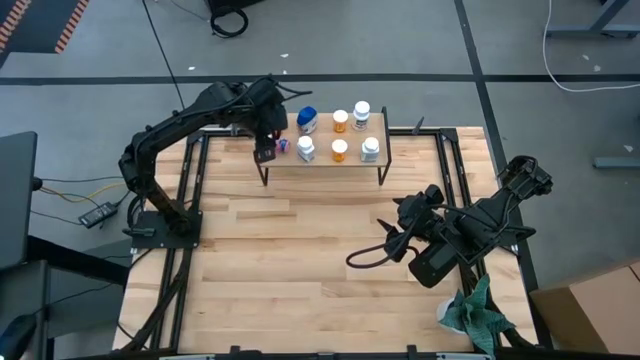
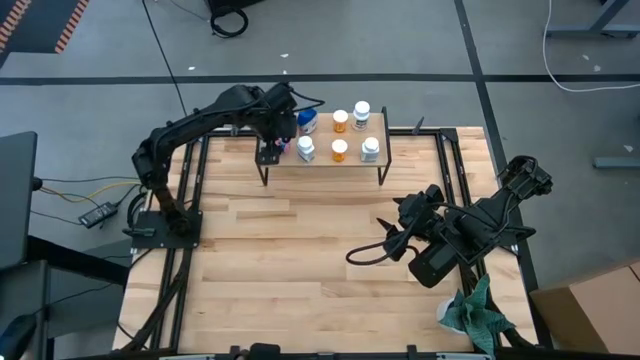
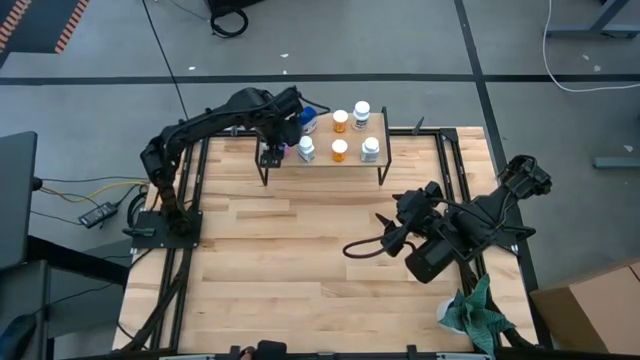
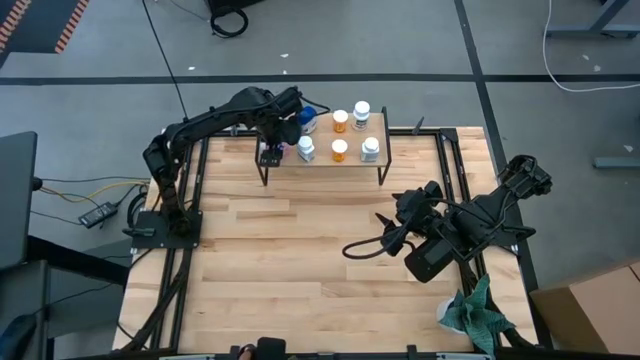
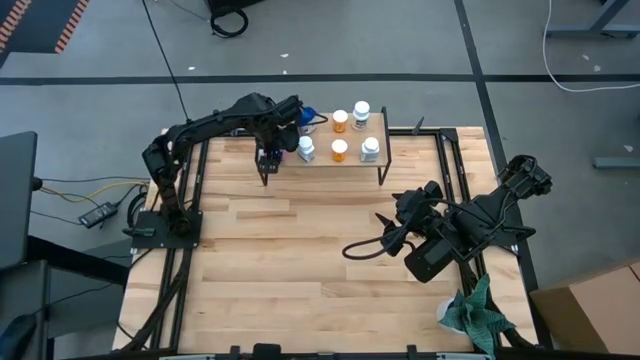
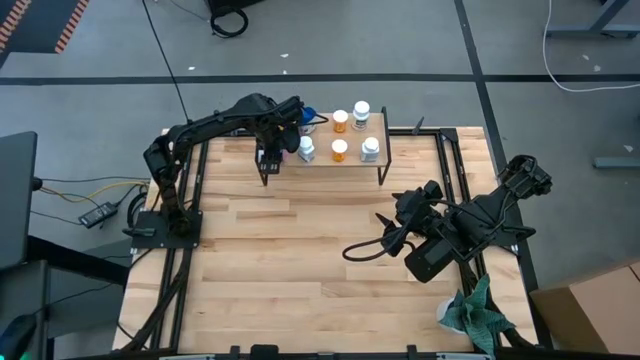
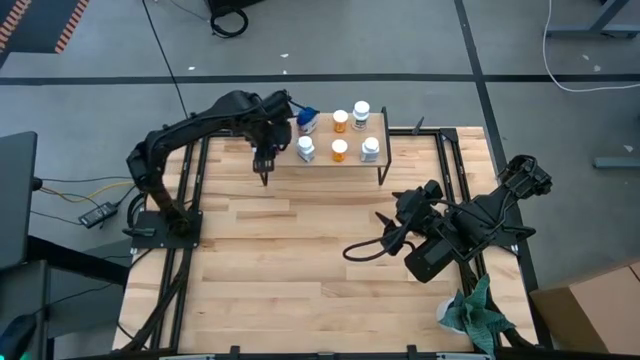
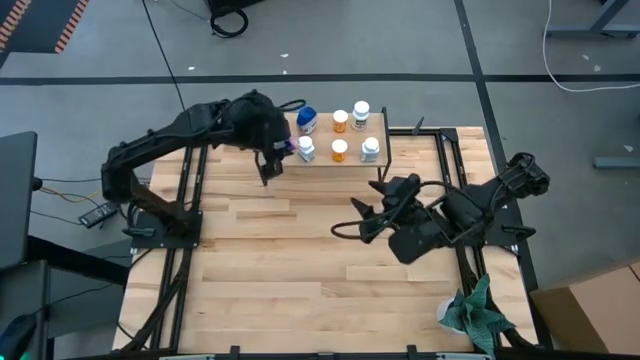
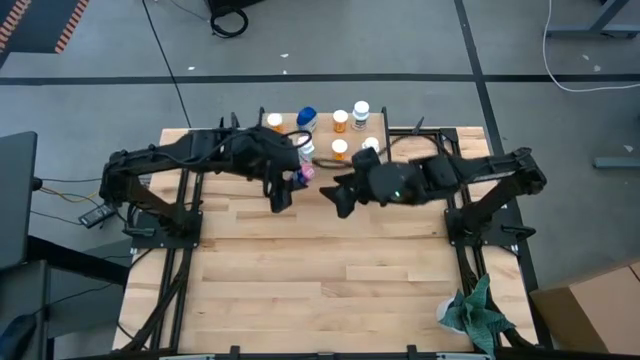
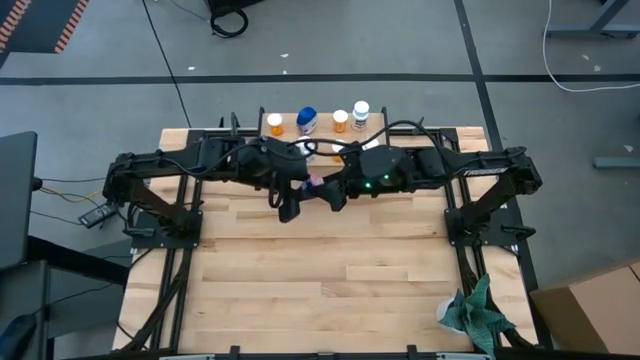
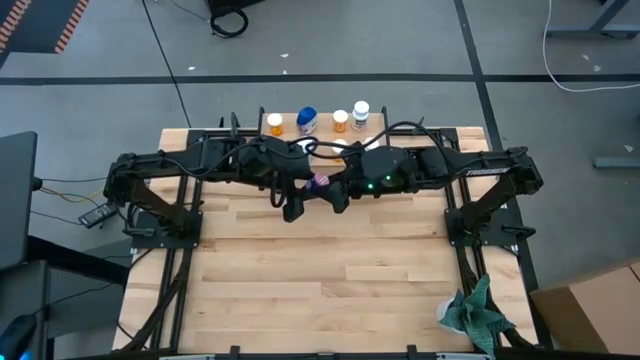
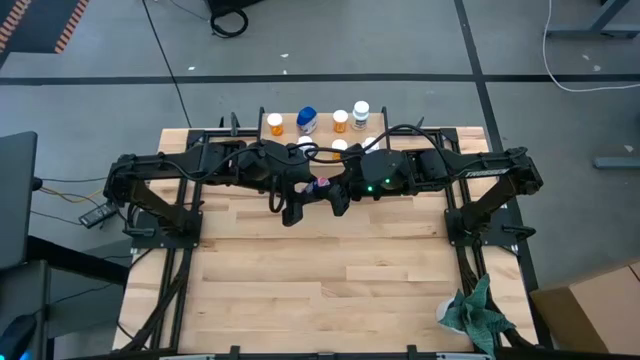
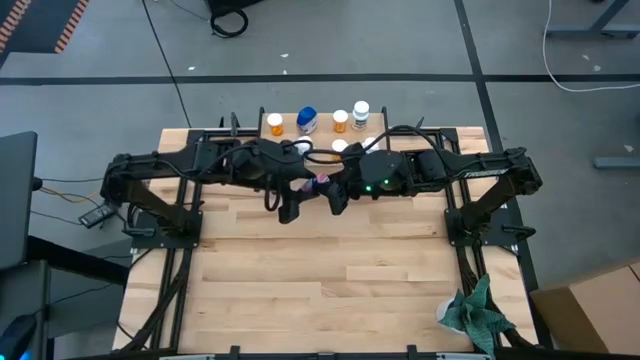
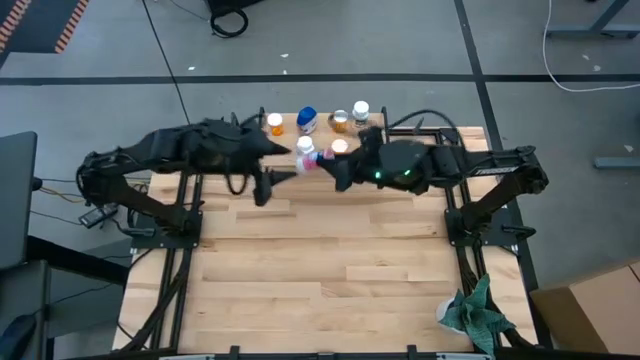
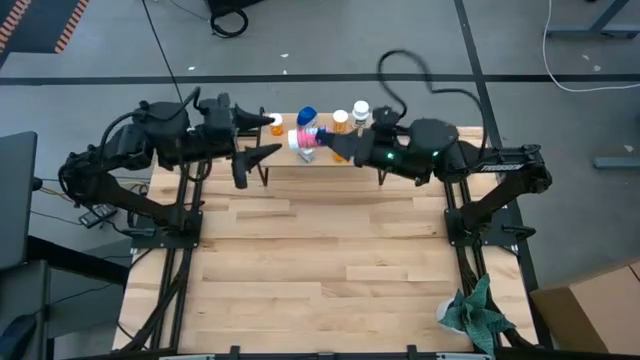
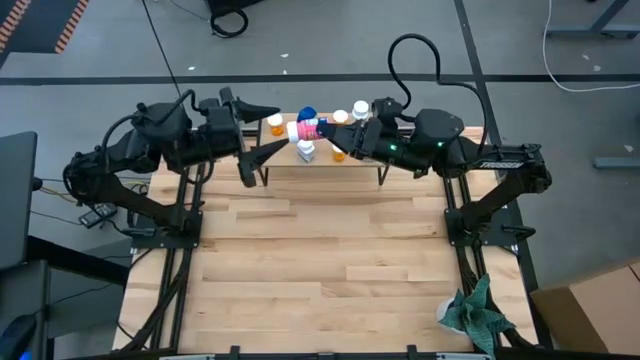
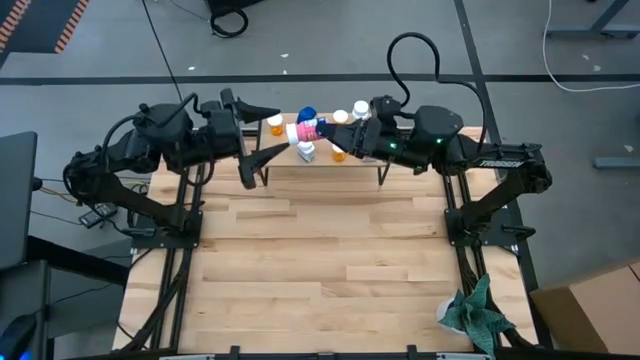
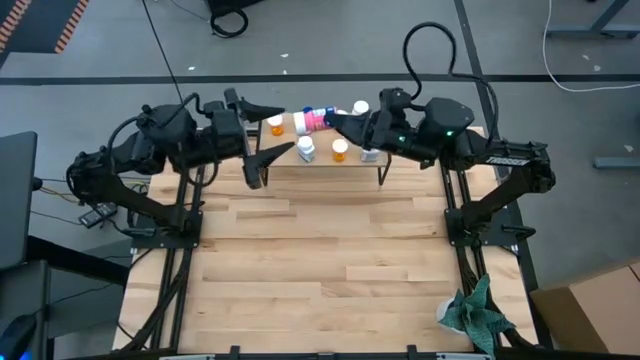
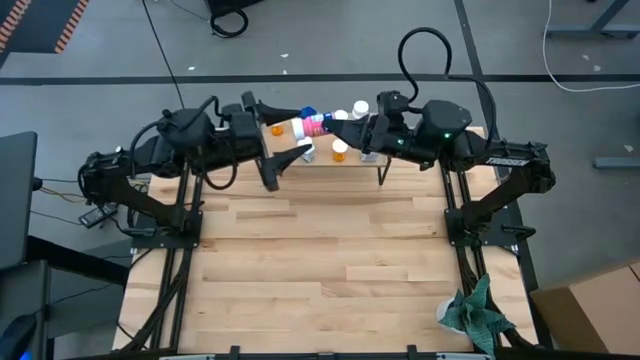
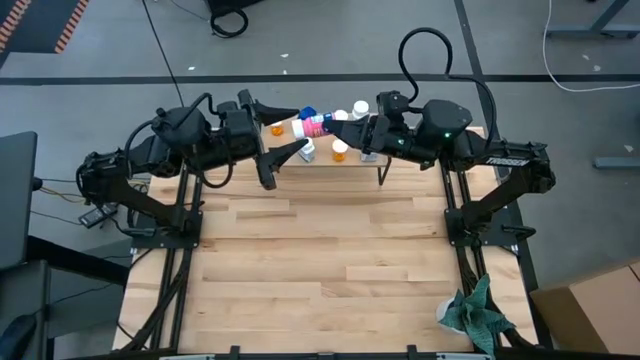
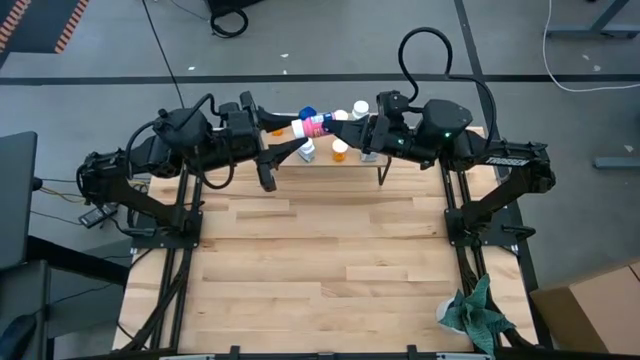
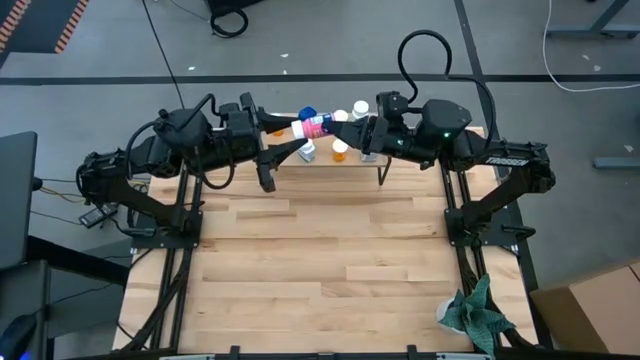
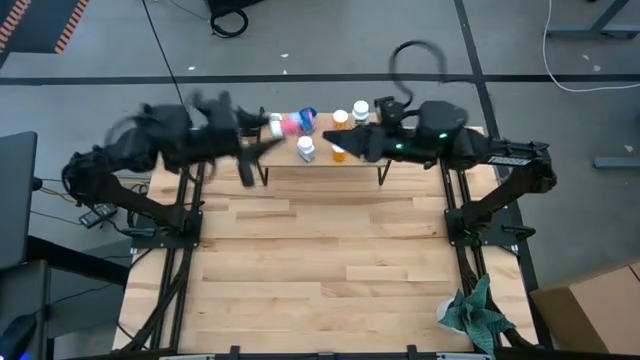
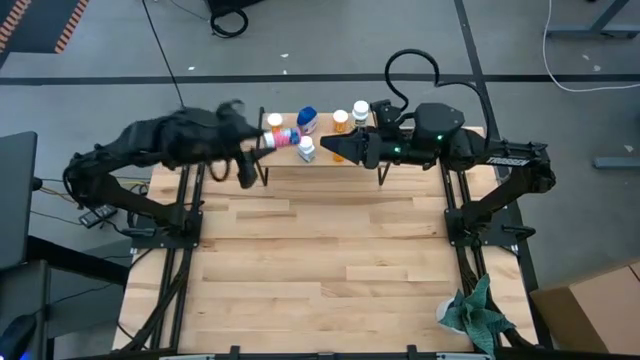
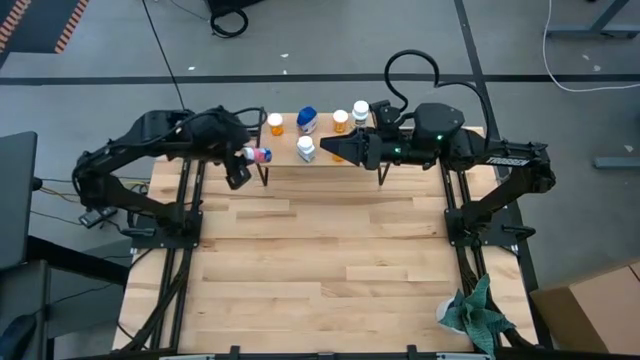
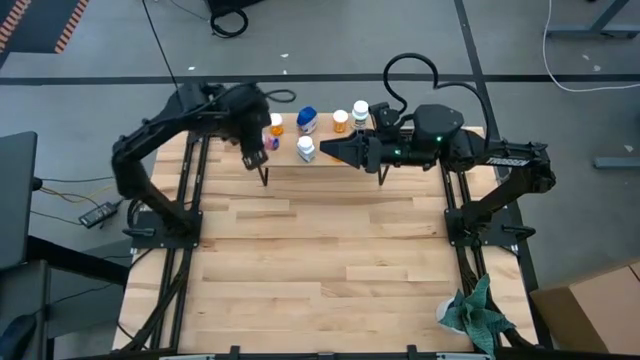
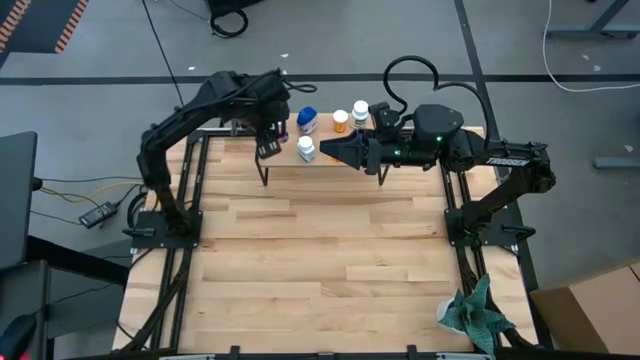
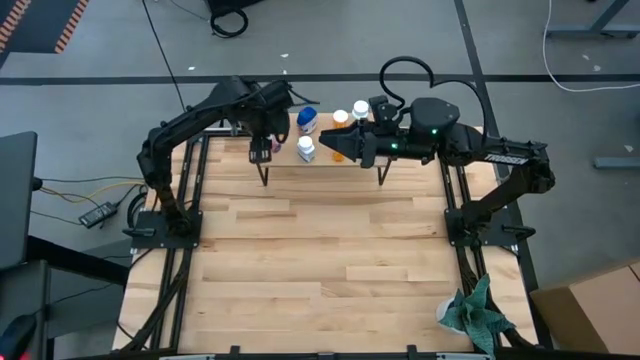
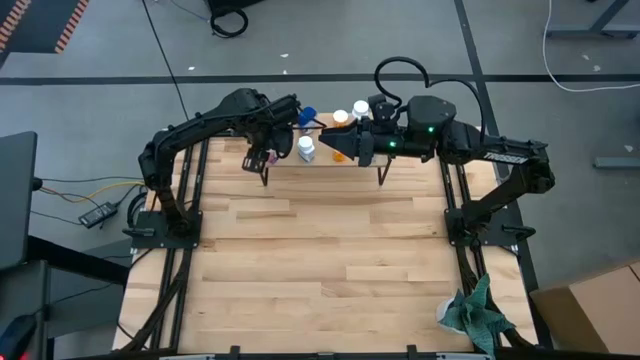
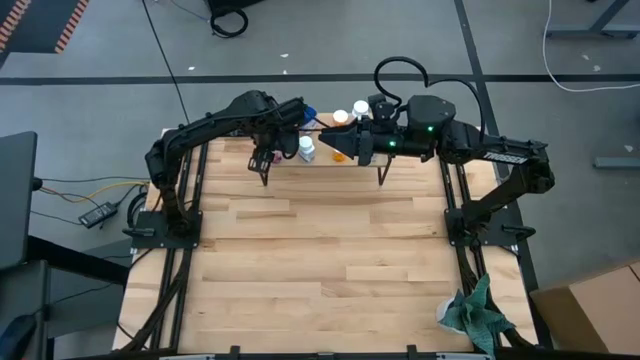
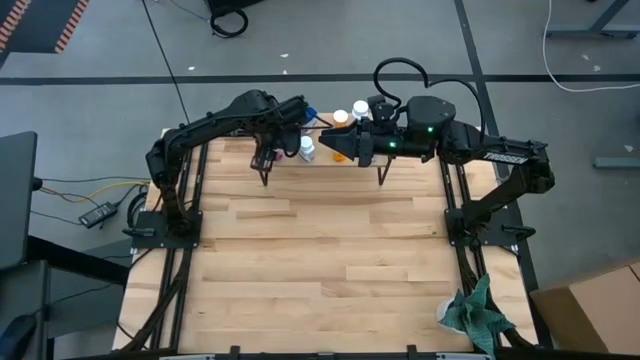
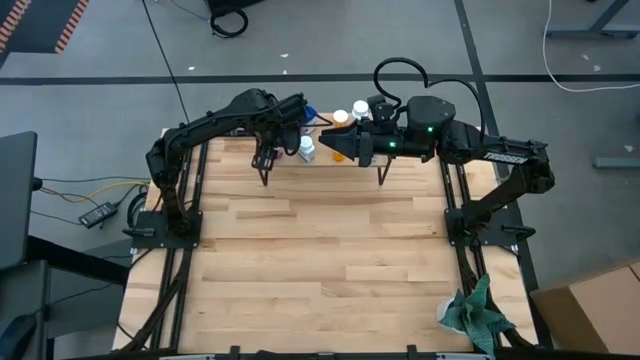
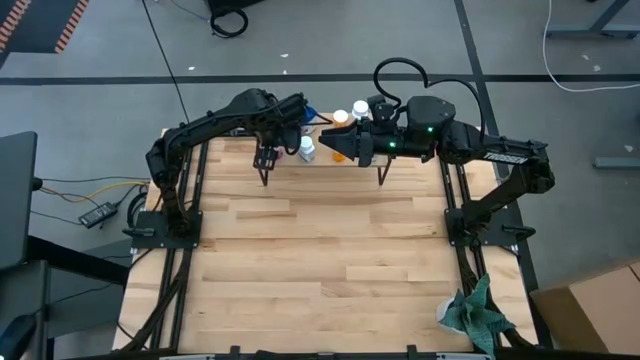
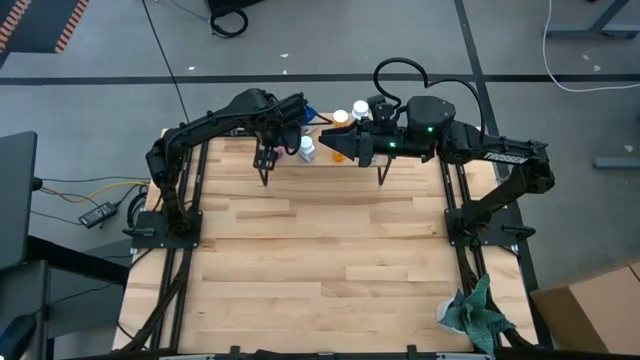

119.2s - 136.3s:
Task: Pick and place medicine bottles onto shelf by color
Put the pink medicine bottle on the shelf

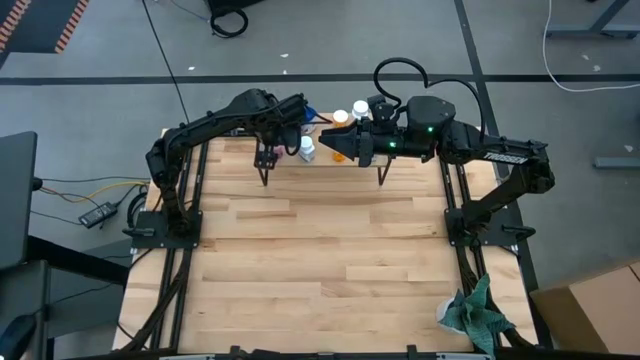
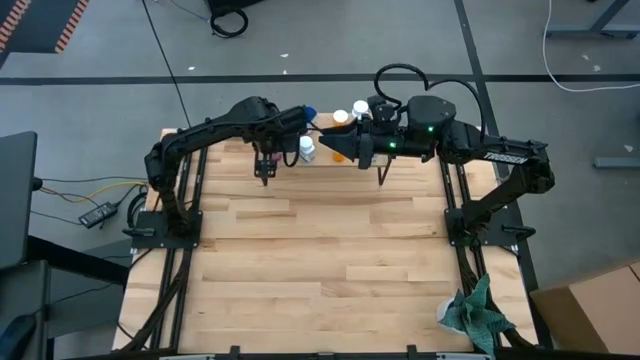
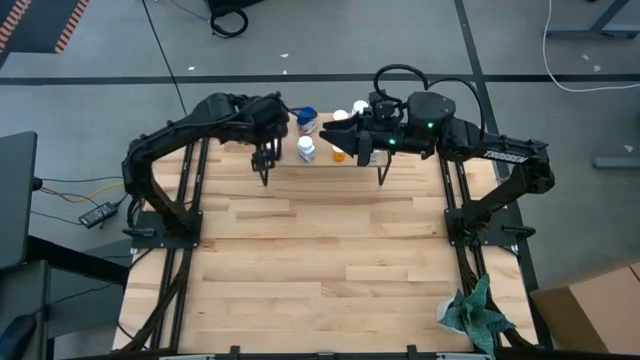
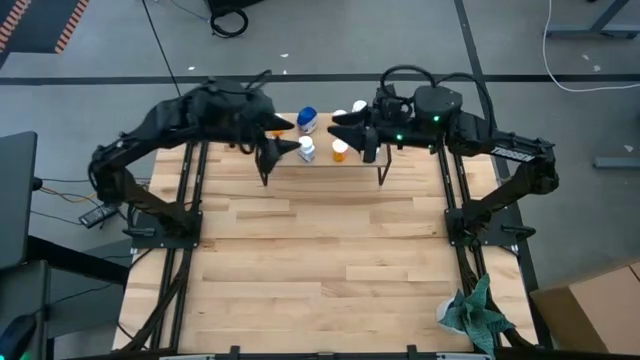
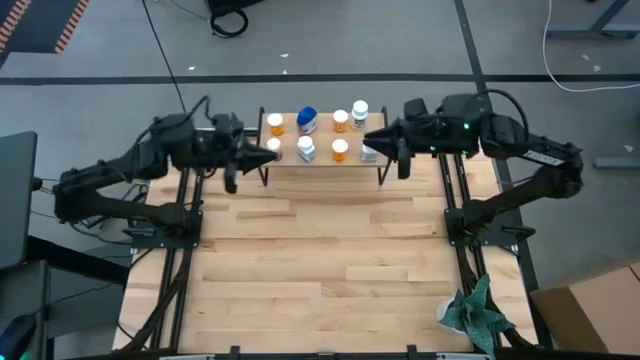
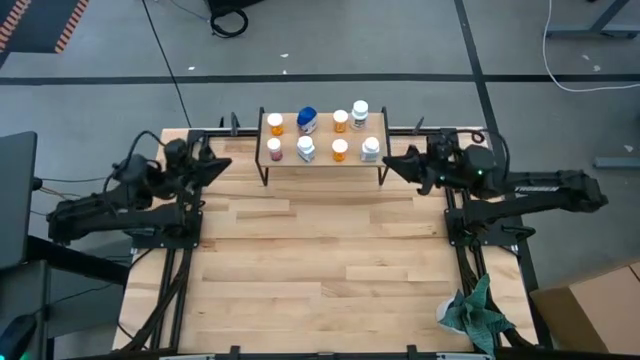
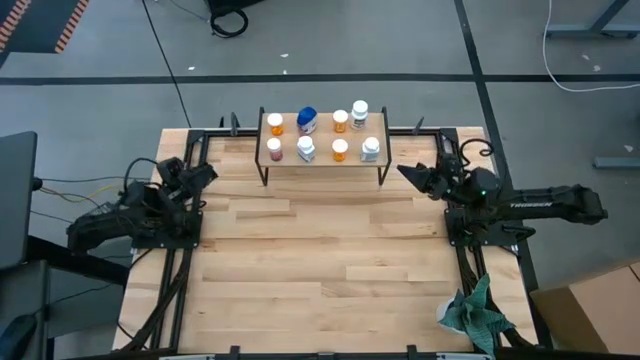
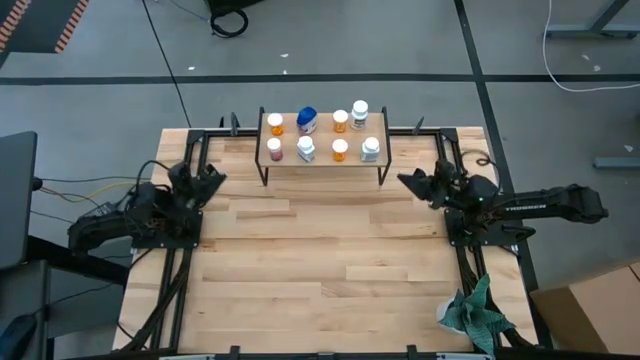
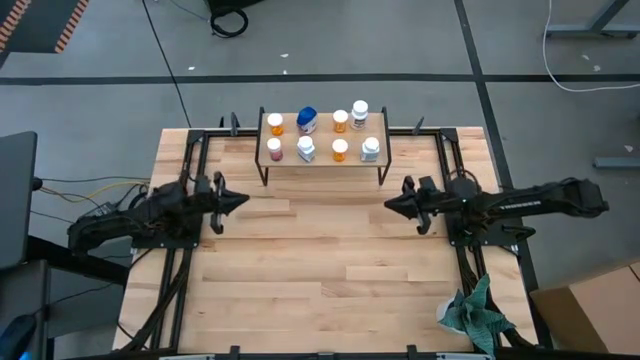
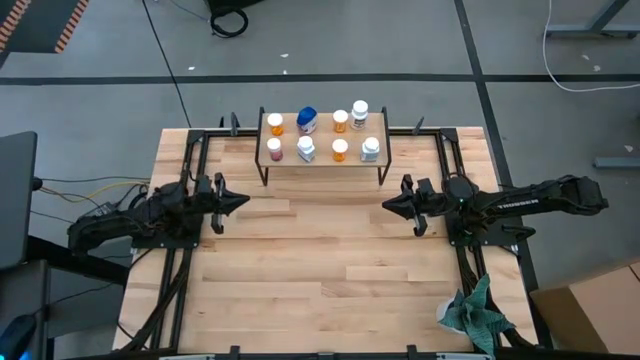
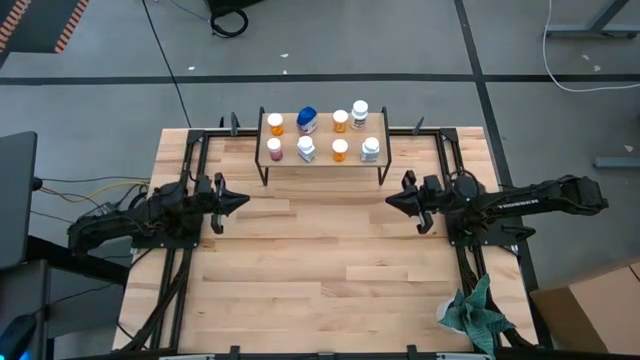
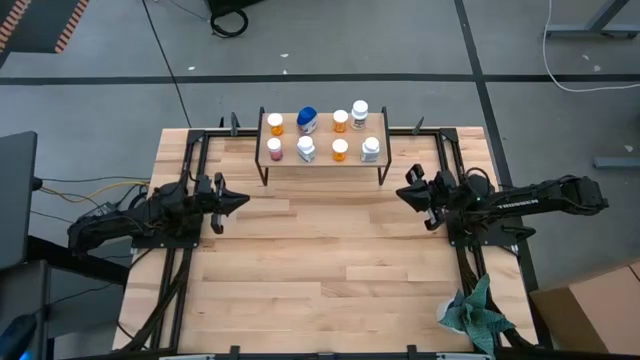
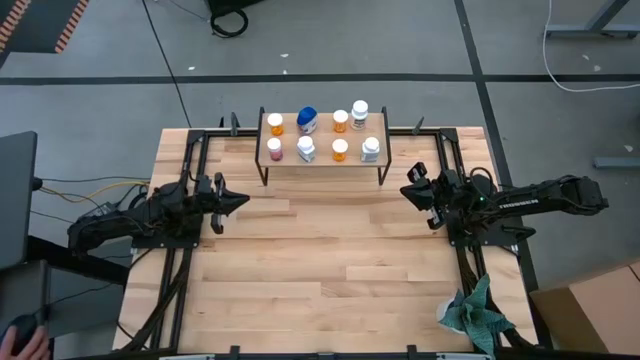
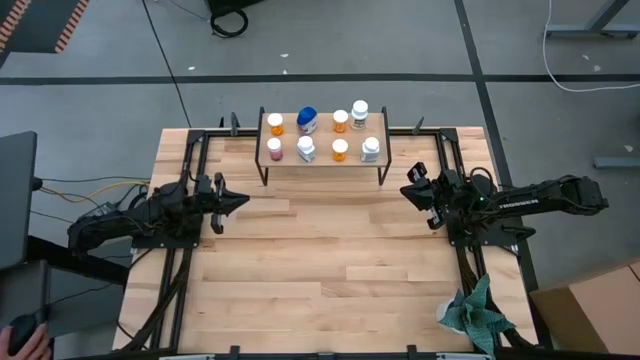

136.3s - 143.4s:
Return to Home Position
